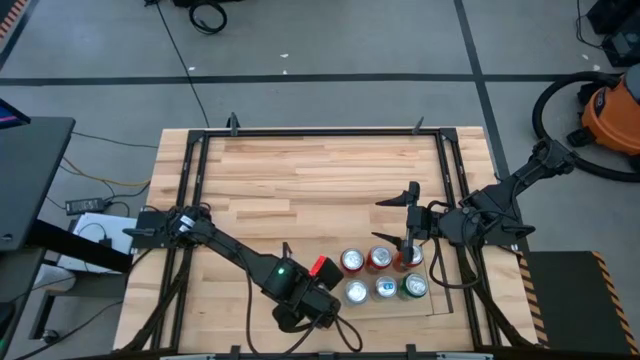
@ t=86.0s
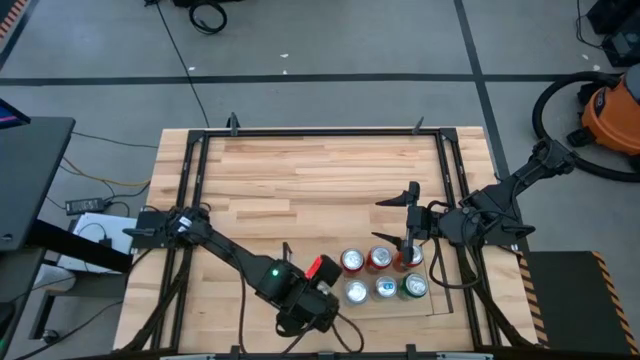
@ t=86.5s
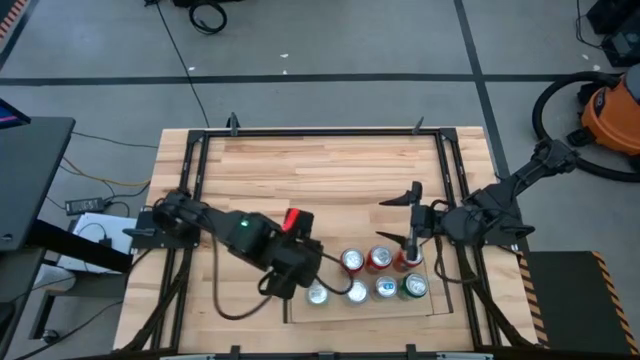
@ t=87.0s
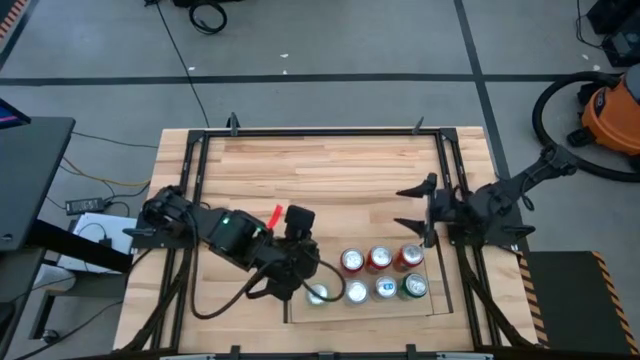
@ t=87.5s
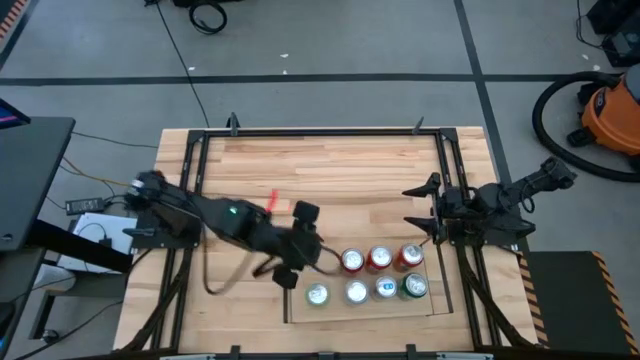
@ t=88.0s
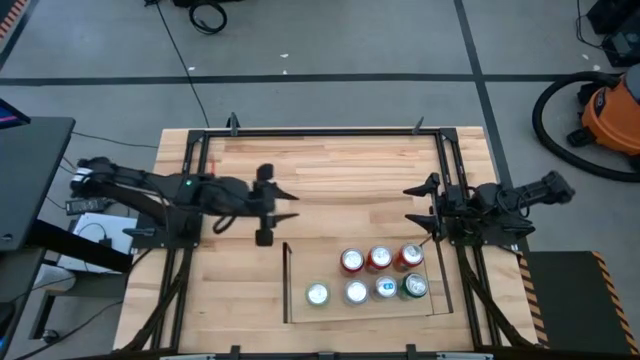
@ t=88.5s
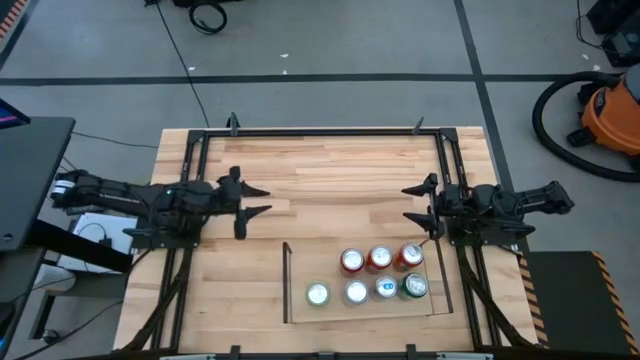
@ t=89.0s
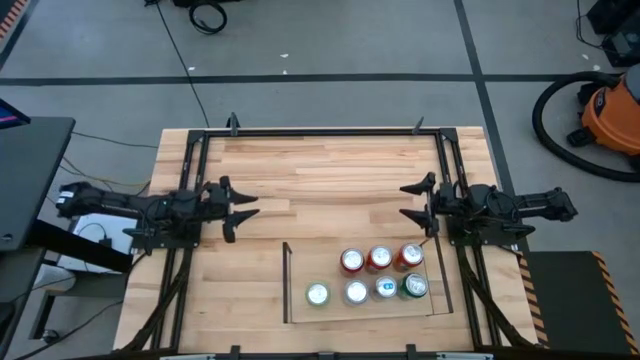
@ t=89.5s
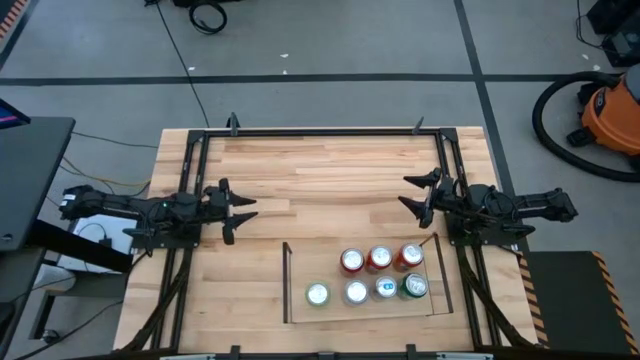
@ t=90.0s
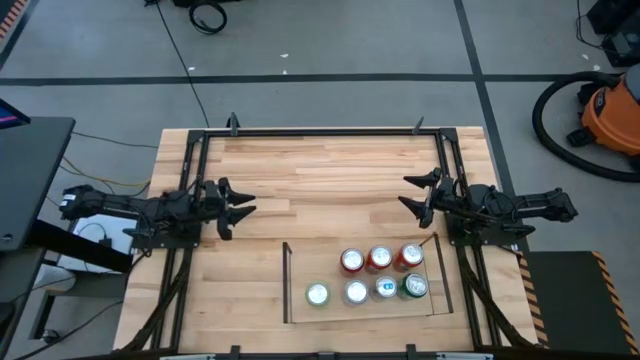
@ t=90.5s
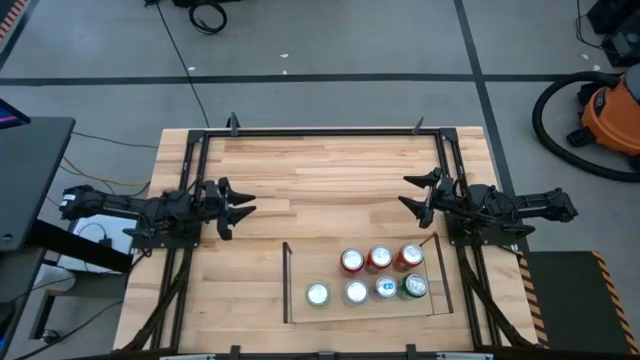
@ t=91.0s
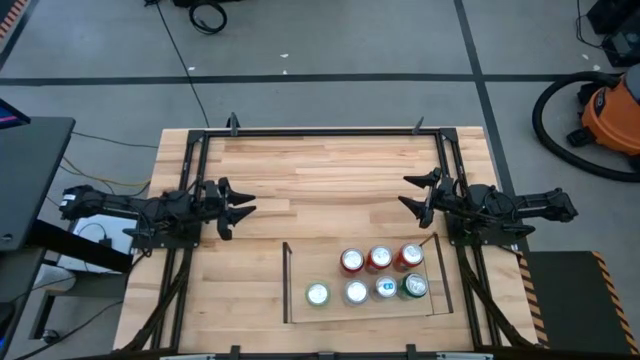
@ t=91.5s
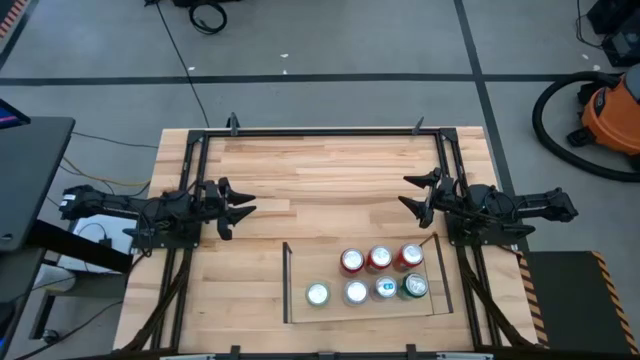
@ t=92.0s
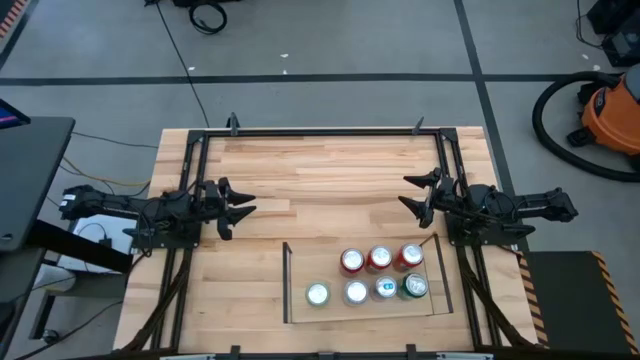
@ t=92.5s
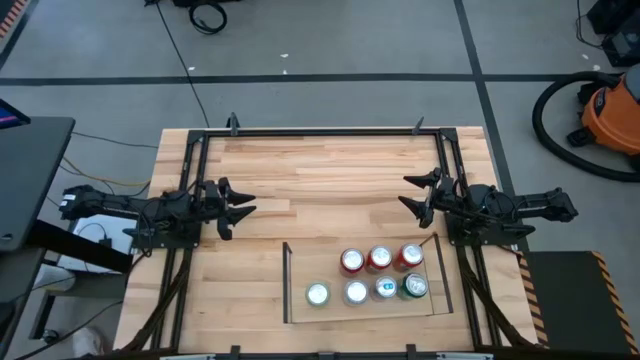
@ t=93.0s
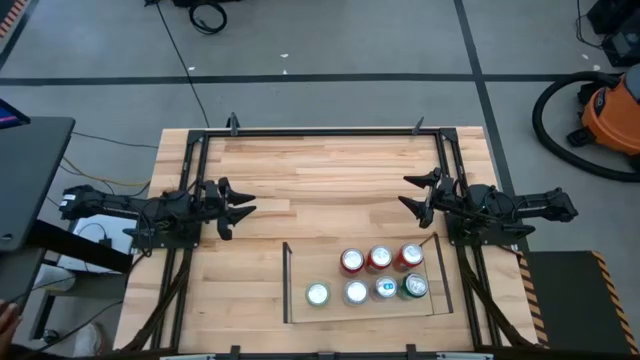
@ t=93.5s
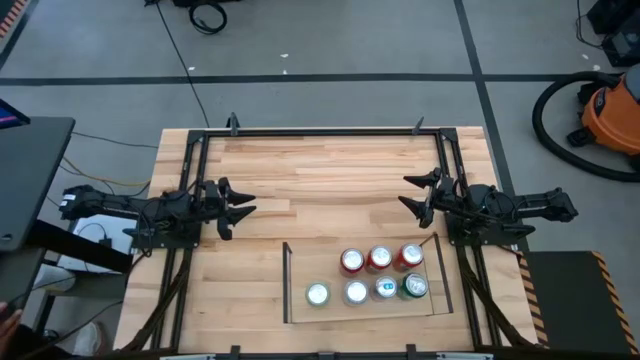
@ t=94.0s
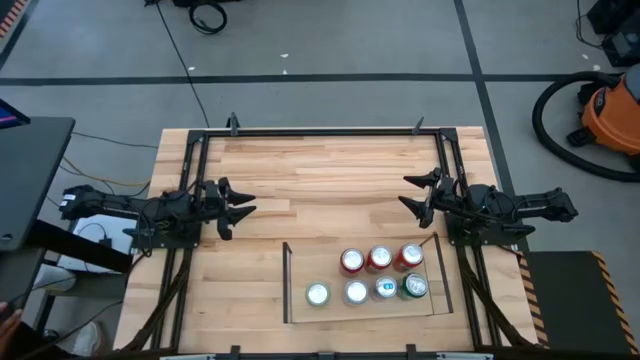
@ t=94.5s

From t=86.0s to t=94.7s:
Task: Place canned beverage on shelf
Return to Home Position

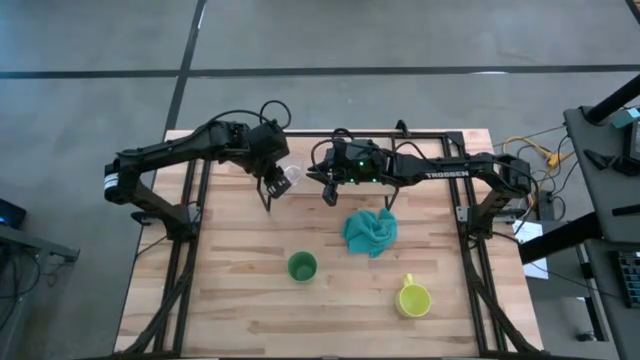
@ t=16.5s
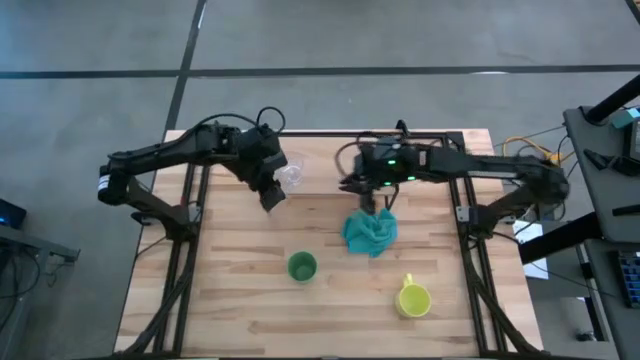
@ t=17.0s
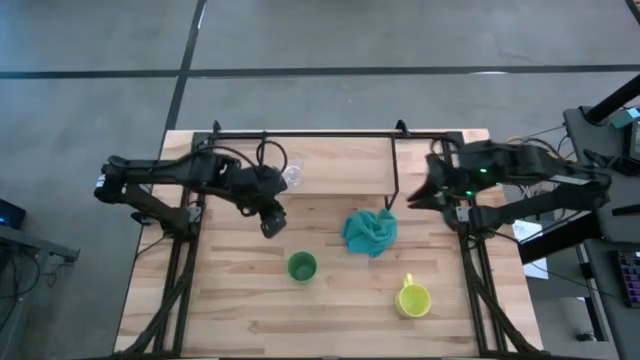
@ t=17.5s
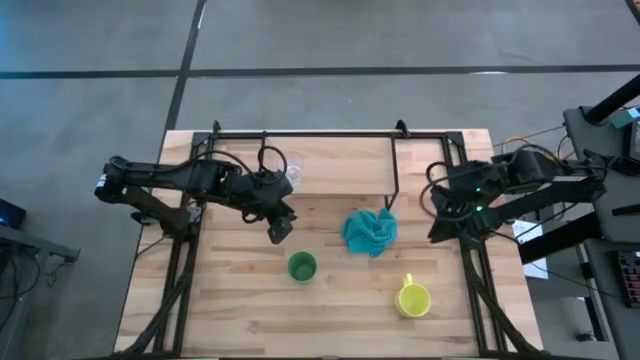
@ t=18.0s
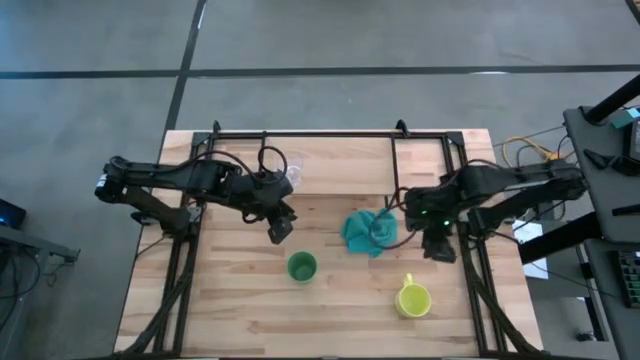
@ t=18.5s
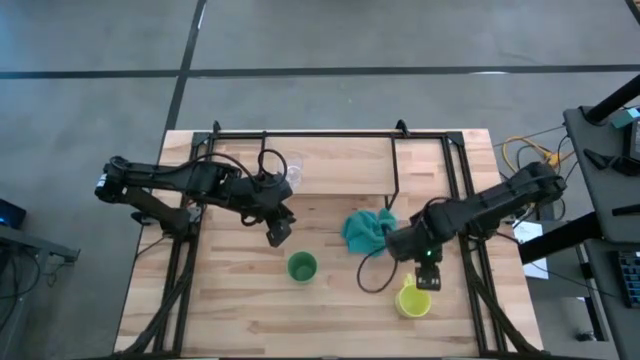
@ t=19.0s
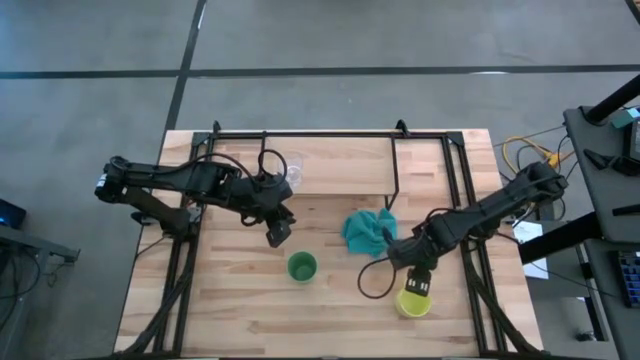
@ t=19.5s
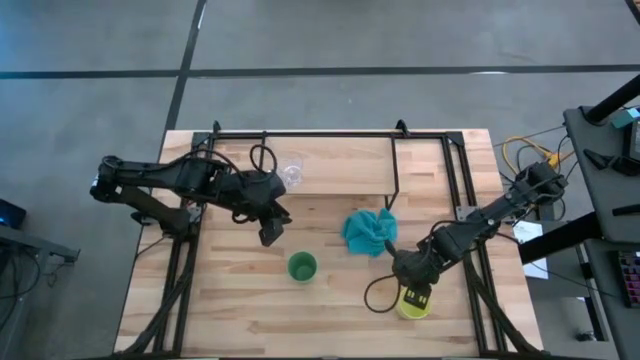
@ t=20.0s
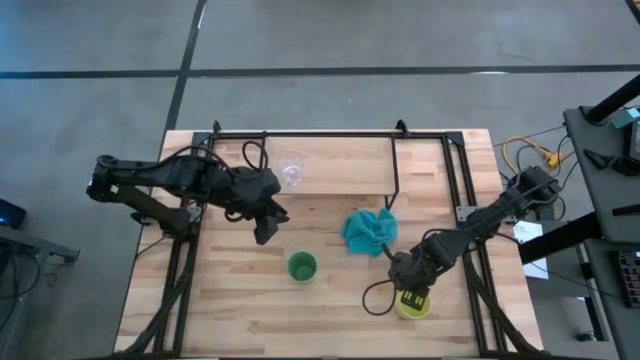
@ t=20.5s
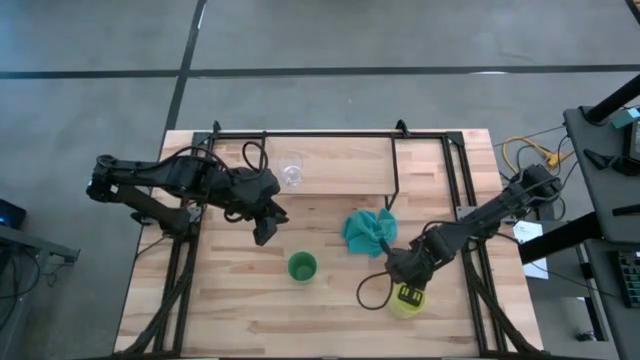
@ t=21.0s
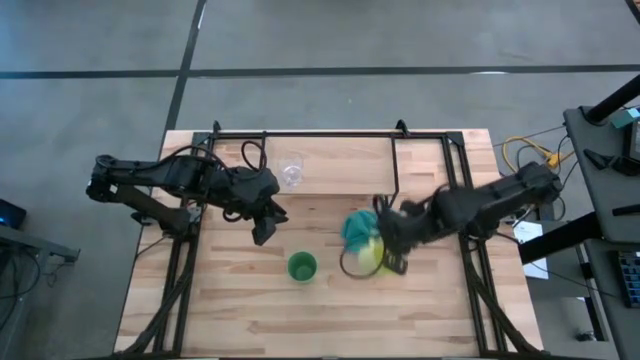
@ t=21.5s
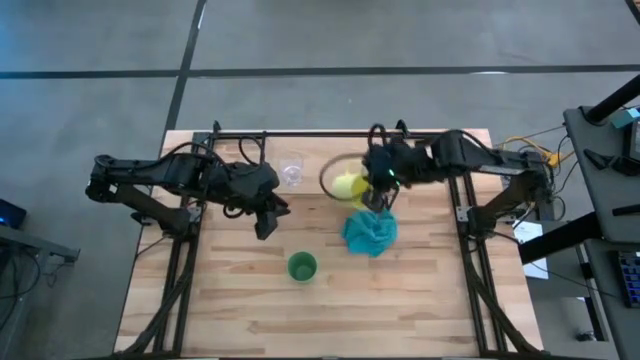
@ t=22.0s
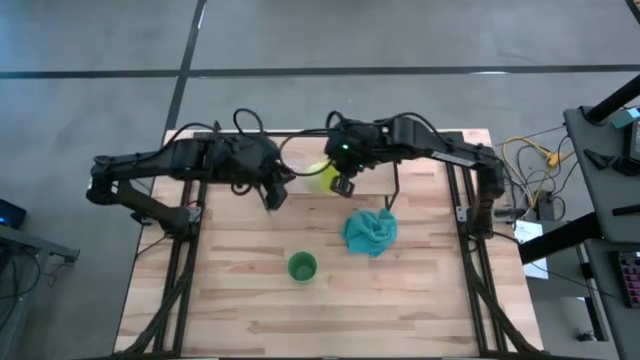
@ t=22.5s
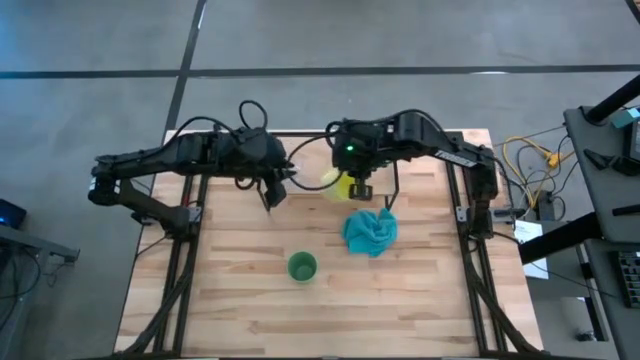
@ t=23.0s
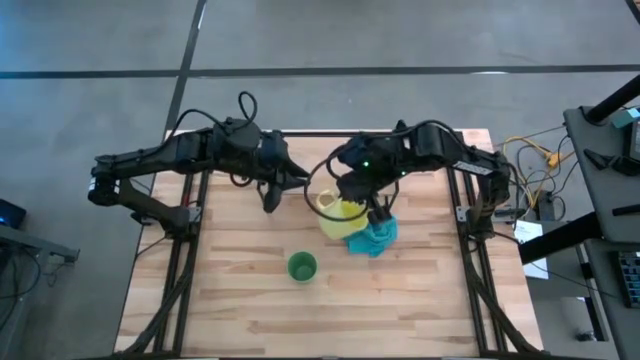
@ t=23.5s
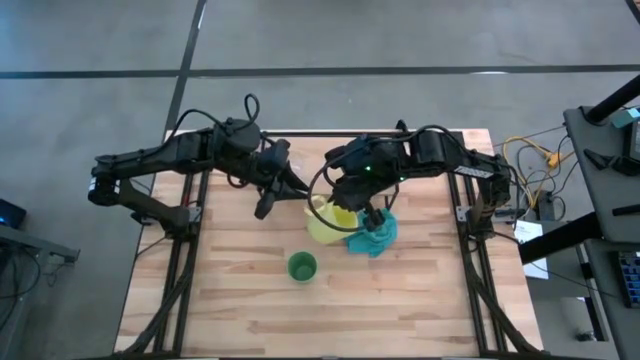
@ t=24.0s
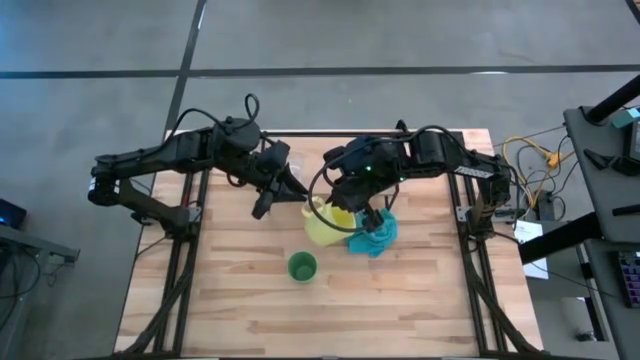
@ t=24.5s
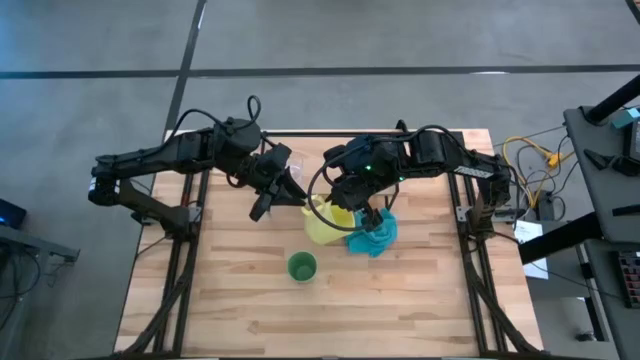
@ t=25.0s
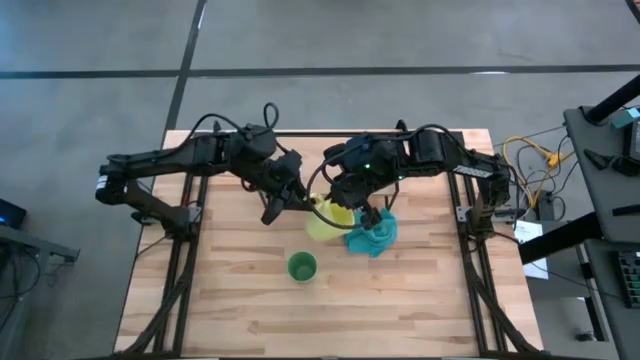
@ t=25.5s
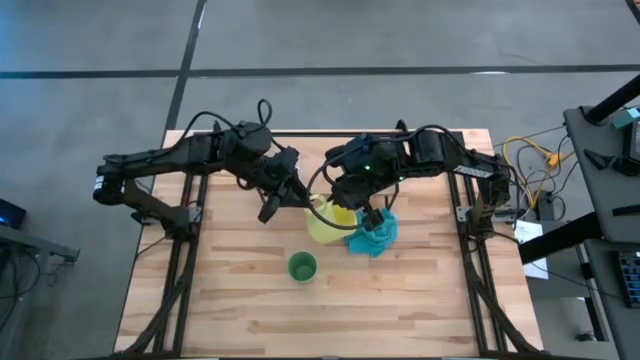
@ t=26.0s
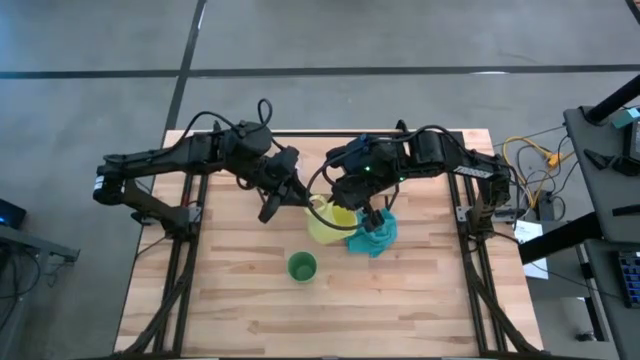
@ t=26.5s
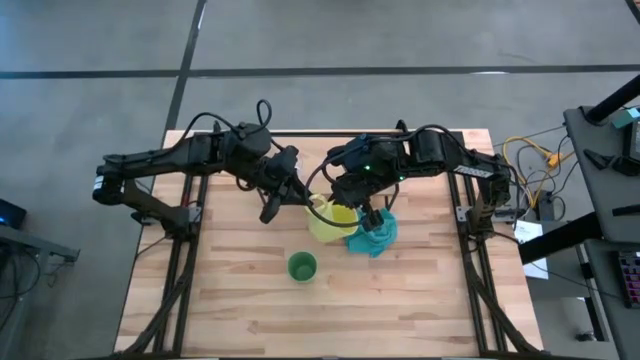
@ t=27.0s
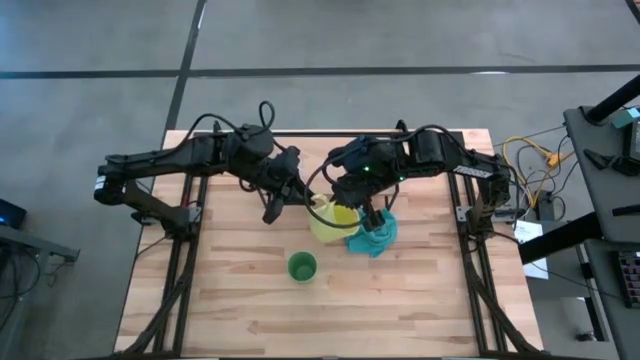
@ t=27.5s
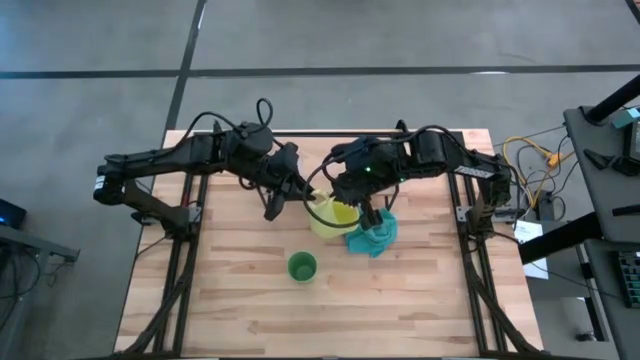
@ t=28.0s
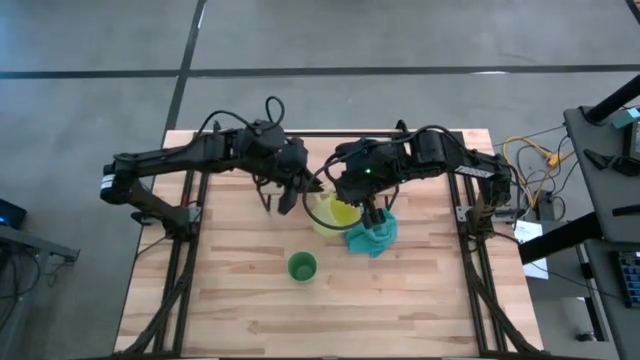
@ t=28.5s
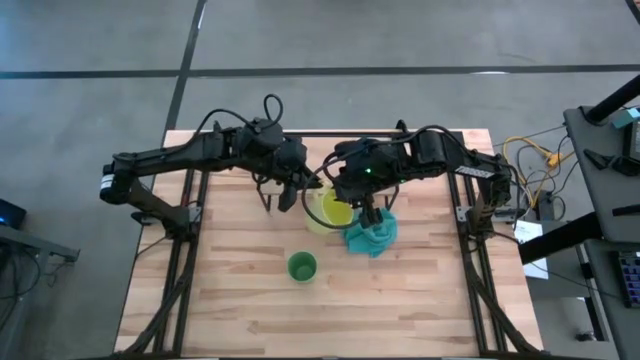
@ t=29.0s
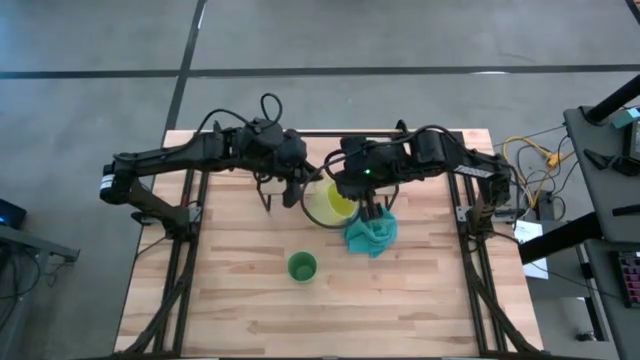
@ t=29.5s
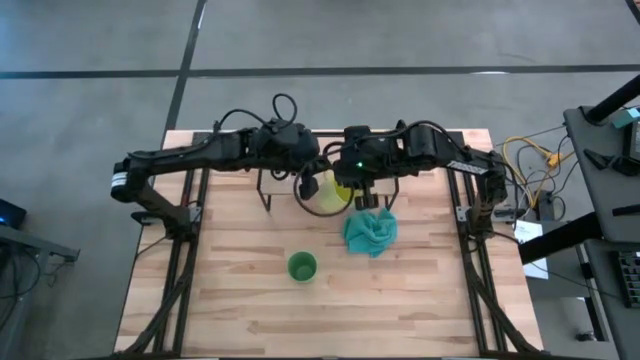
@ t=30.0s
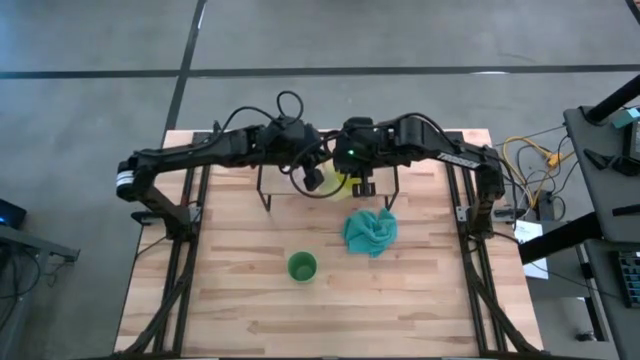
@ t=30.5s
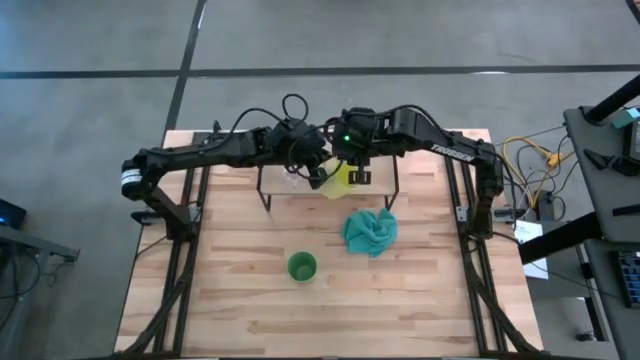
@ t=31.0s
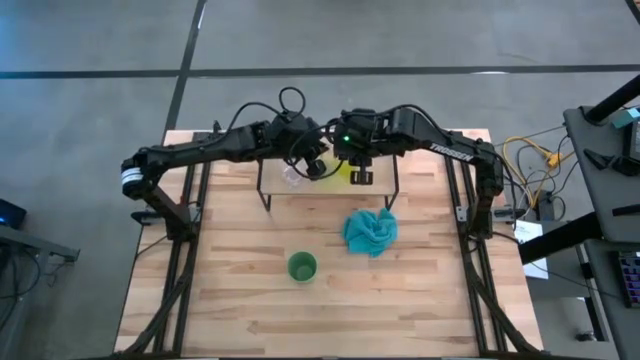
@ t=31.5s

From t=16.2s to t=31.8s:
Task: Stack small to large cups/mugs on shelf
Put the yellow cup on the shelf
